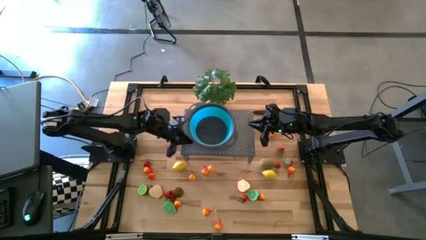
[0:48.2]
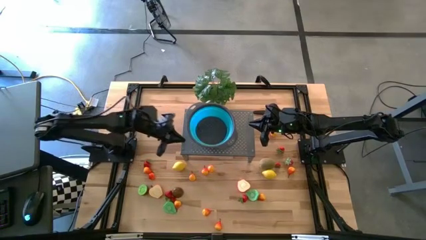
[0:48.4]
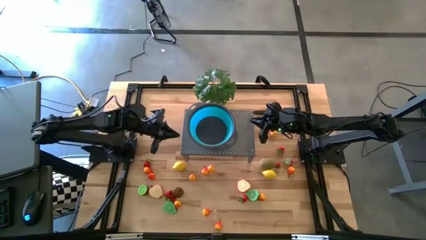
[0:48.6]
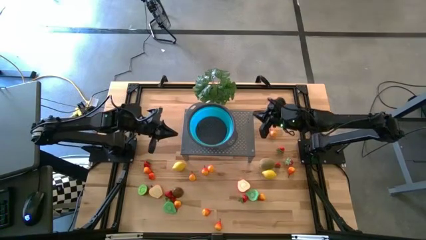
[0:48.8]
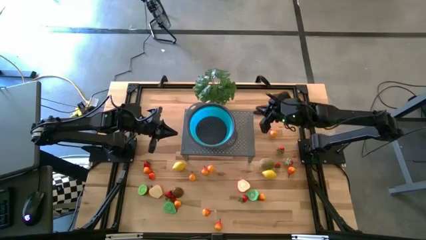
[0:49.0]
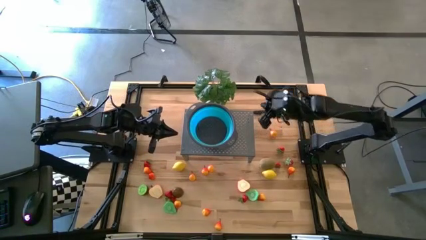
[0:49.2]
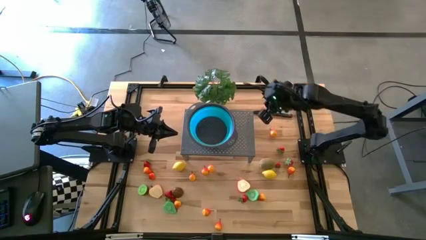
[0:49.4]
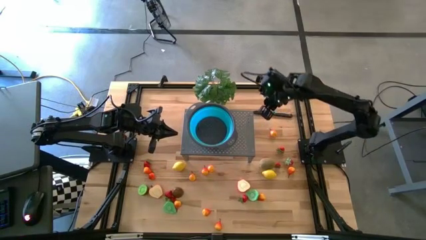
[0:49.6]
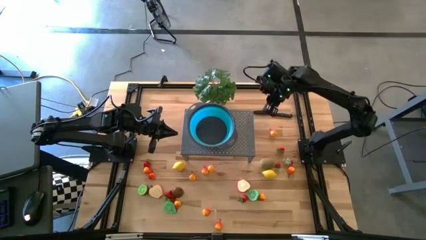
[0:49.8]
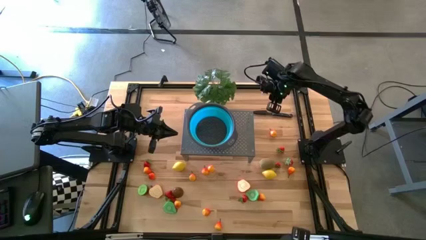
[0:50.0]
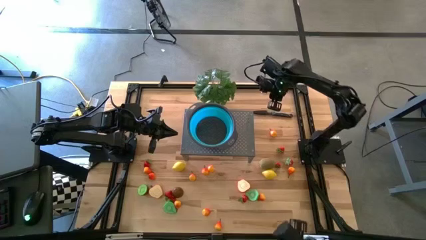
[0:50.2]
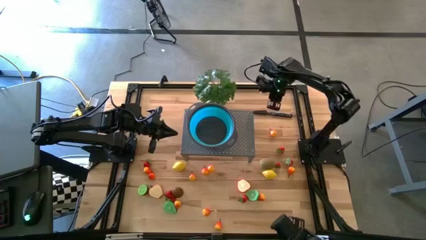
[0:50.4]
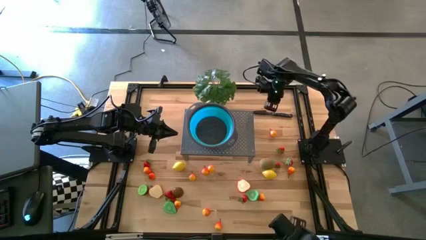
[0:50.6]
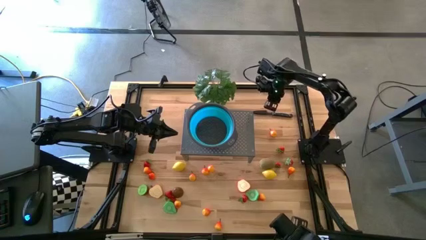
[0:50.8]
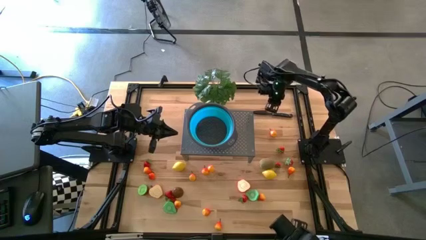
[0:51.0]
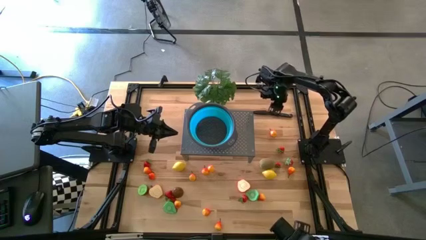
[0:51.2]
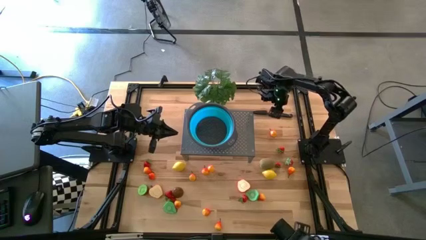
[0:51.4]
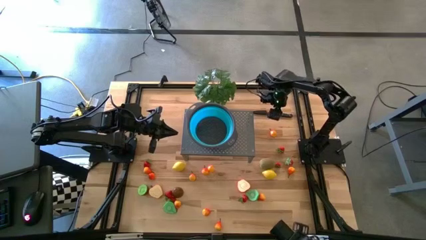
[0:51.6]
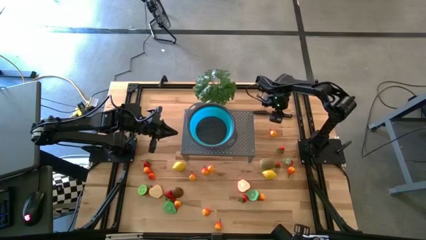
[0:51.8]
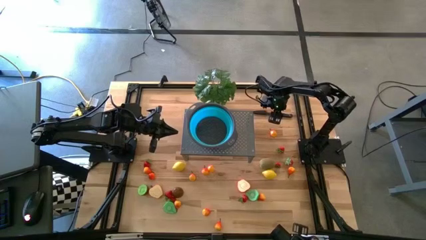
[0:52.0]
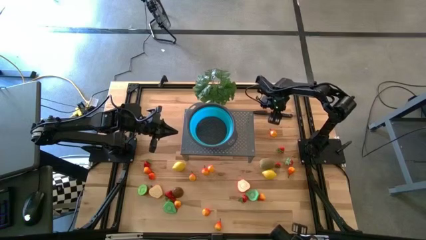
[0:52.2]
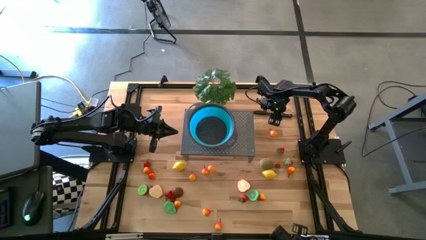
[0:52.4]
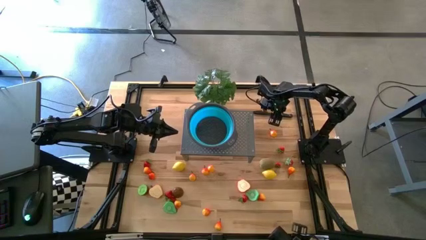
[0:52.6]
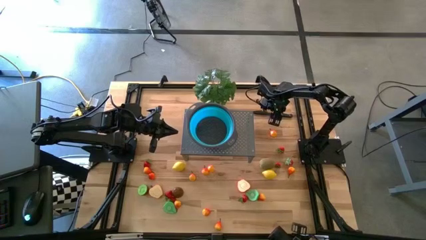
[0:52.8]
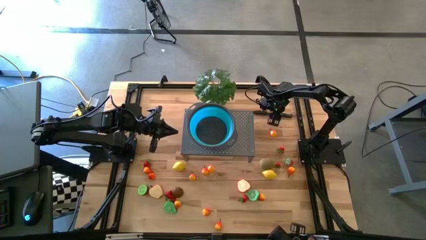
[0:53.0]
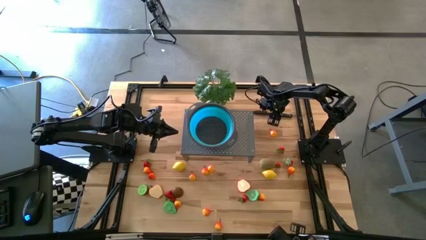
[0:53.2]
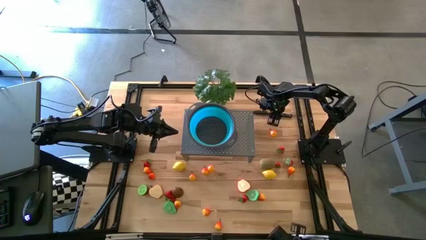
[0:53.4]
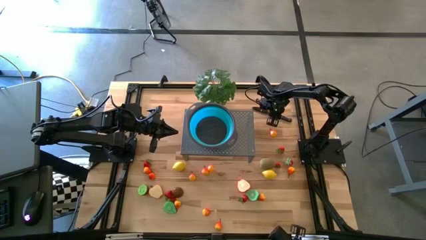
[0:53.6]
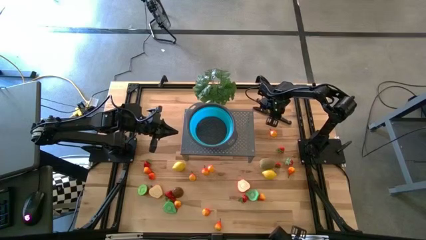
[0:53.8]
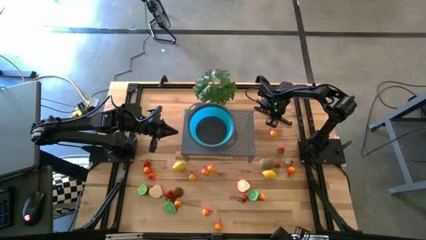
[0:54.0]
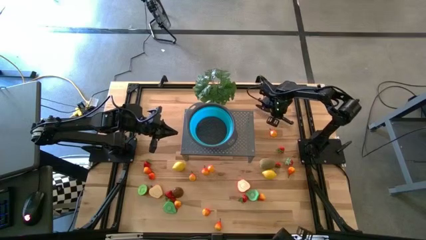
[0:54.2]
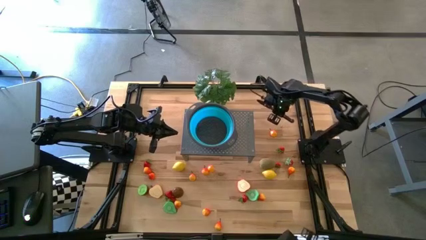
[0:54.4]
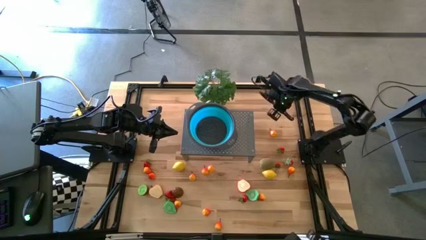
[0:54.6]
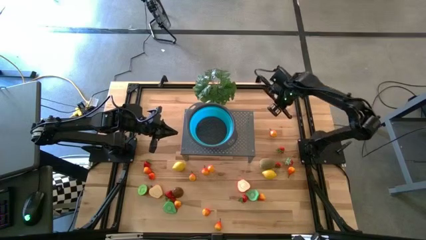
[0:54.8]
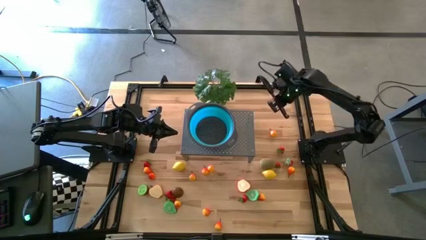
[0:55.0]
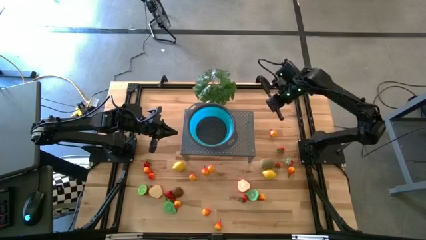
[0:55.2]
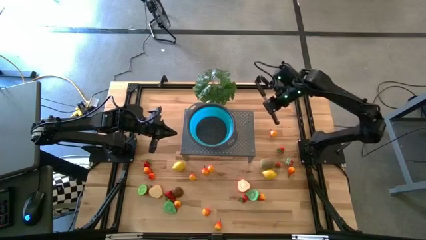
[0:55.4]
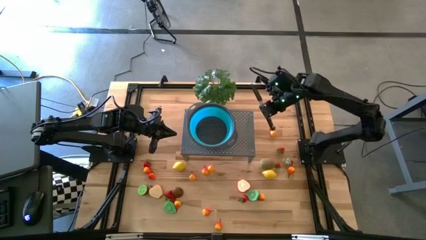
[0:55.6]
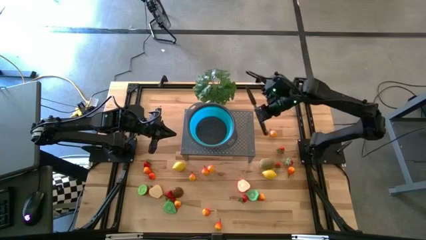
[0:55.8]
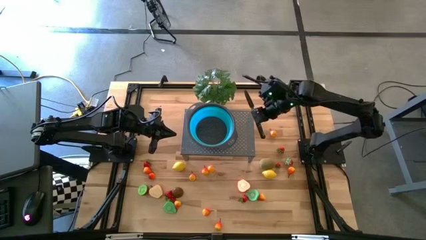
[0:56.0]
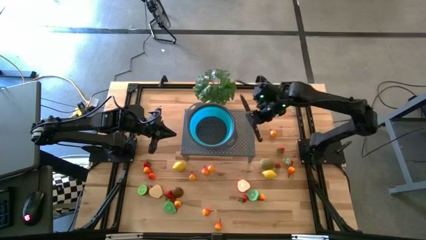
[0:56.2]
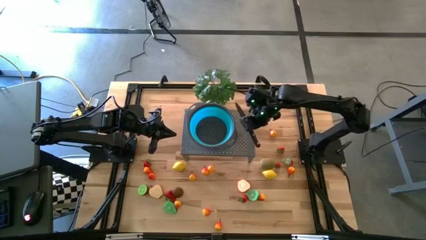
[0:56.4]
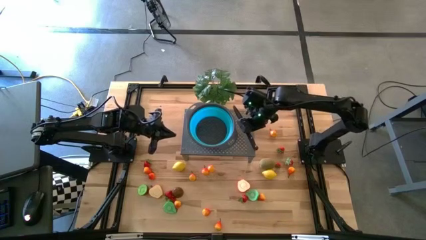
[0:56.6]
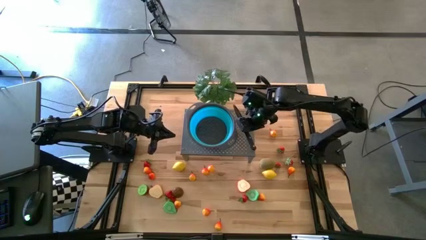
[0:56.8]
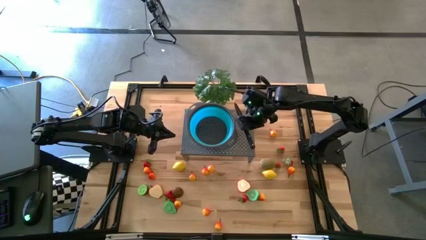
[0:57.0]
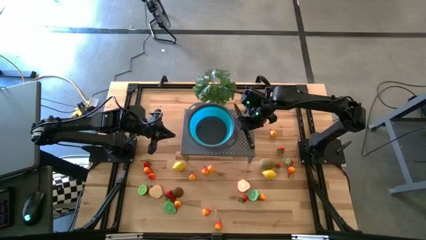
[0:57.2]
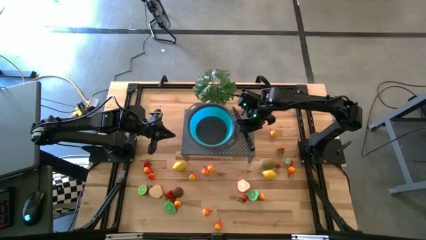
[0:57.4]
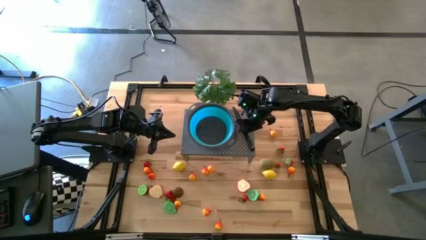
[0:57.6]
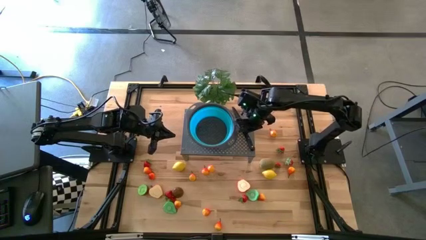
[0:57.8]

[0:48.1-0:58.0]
Task: Pick & Place Fruit
Put the black knife on the shelf
